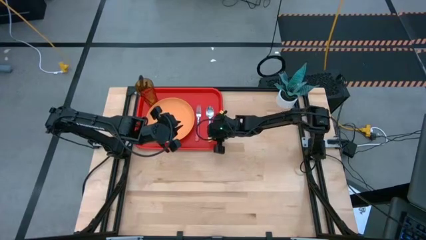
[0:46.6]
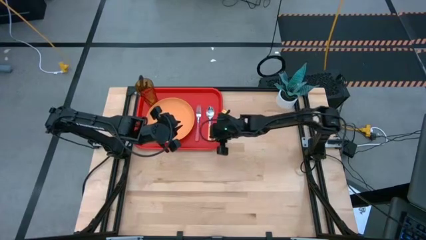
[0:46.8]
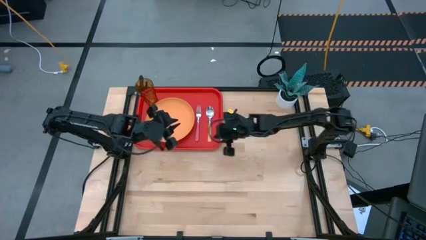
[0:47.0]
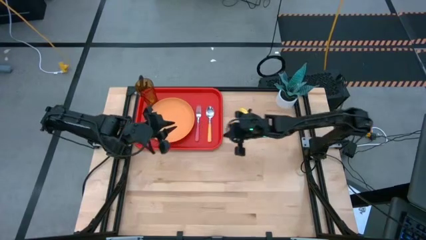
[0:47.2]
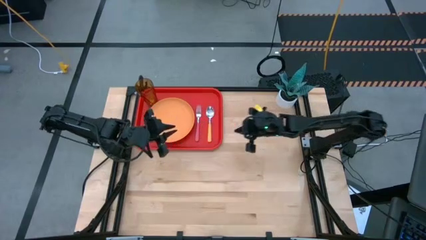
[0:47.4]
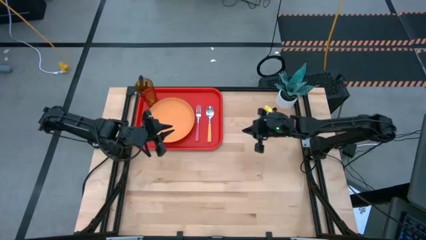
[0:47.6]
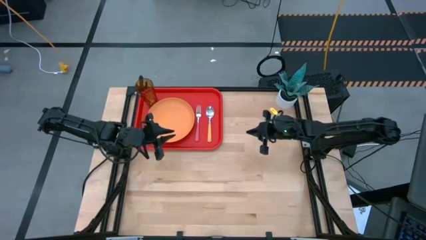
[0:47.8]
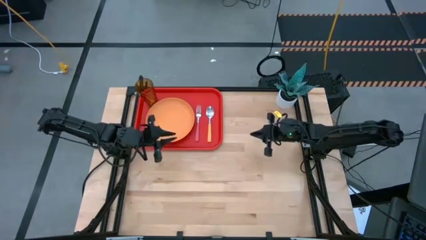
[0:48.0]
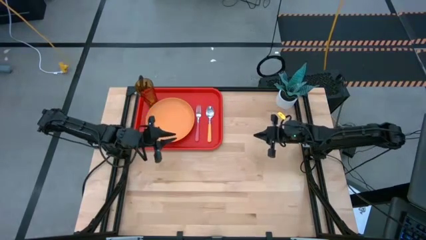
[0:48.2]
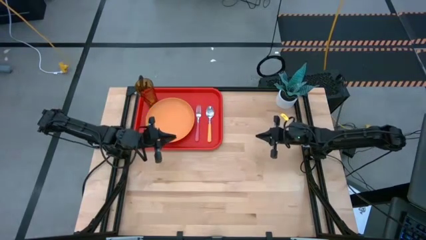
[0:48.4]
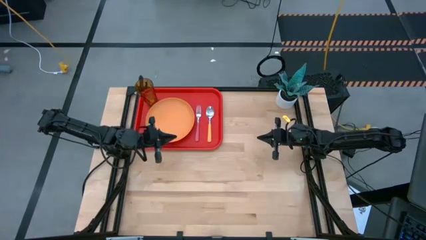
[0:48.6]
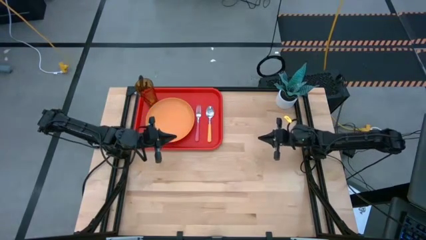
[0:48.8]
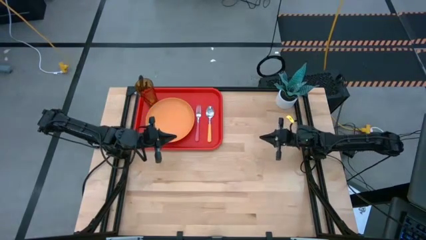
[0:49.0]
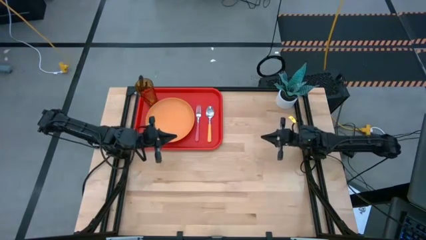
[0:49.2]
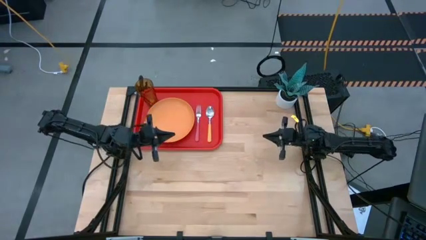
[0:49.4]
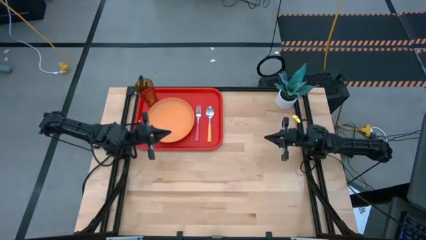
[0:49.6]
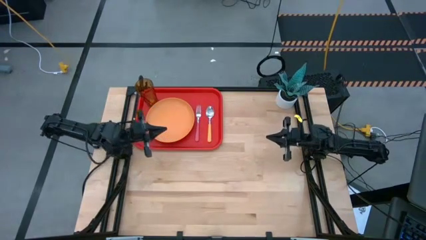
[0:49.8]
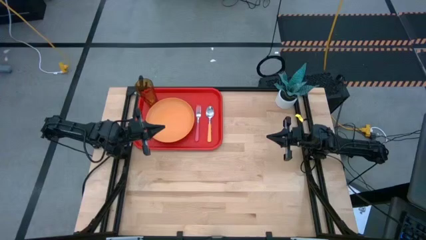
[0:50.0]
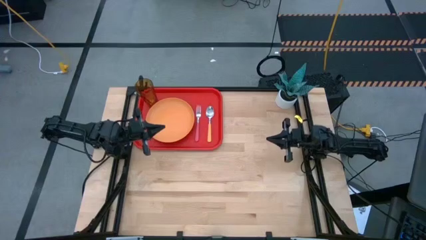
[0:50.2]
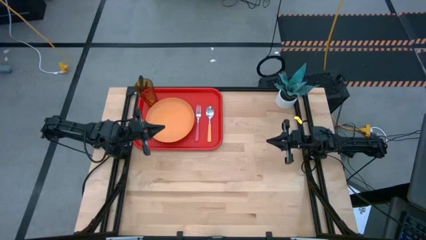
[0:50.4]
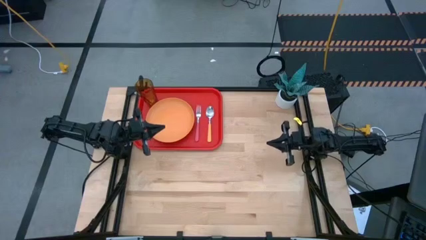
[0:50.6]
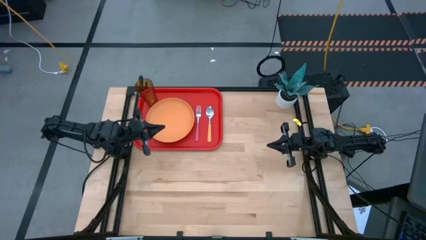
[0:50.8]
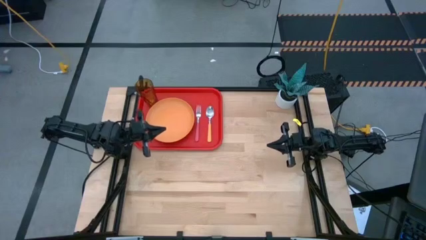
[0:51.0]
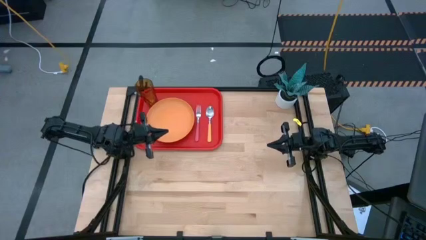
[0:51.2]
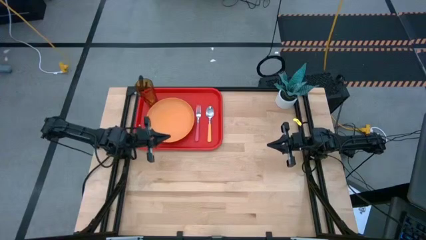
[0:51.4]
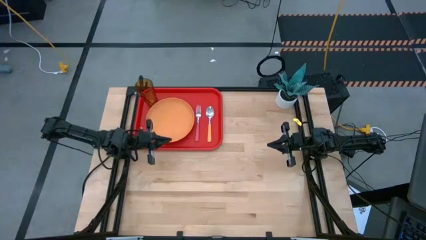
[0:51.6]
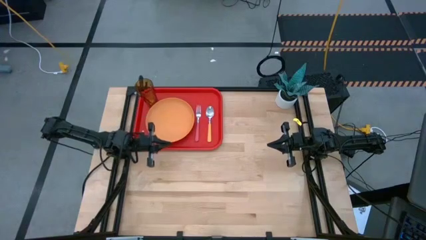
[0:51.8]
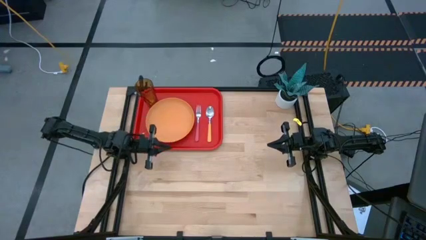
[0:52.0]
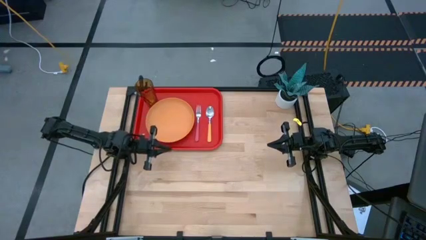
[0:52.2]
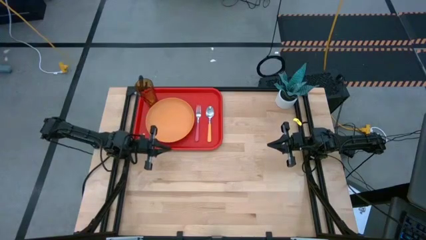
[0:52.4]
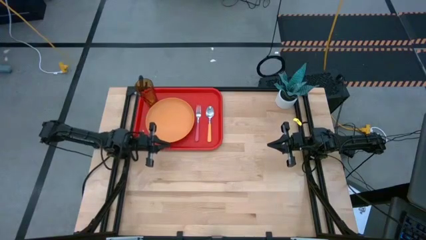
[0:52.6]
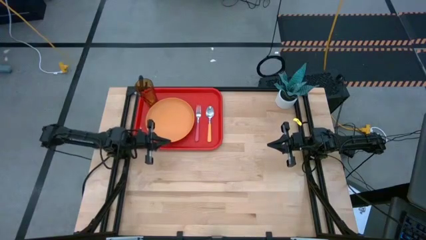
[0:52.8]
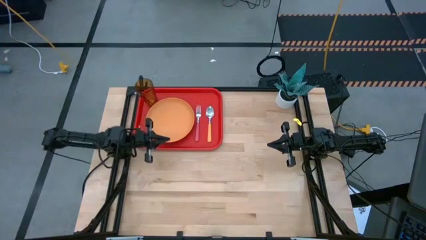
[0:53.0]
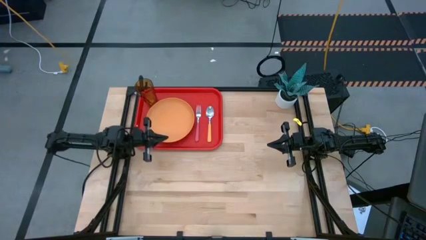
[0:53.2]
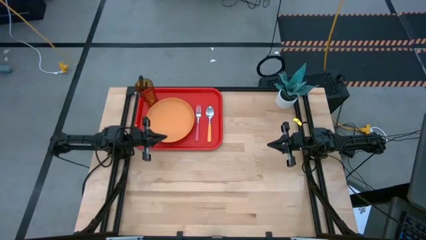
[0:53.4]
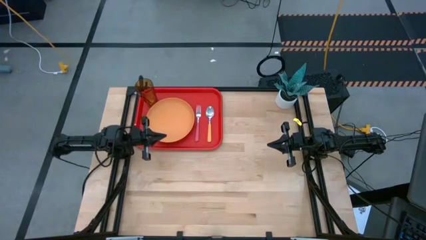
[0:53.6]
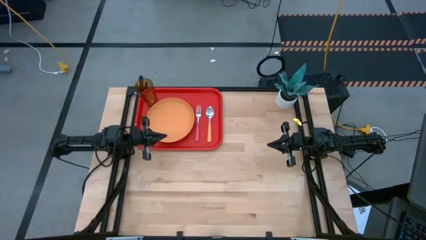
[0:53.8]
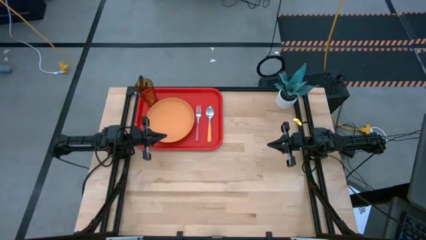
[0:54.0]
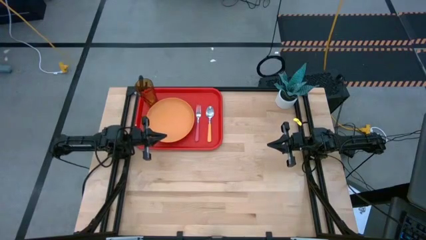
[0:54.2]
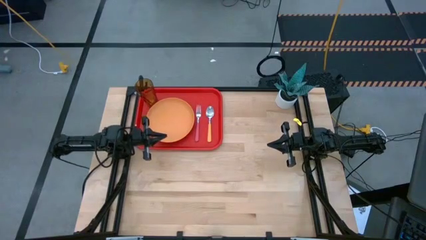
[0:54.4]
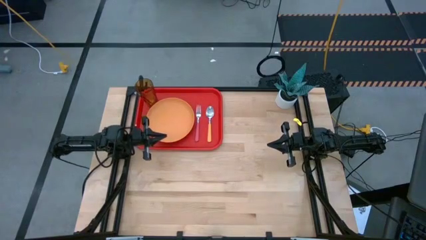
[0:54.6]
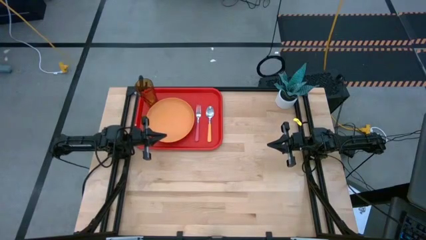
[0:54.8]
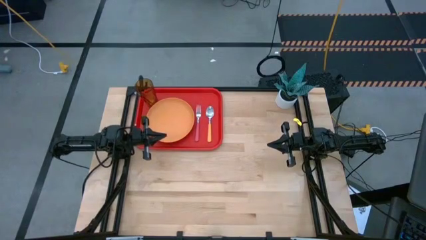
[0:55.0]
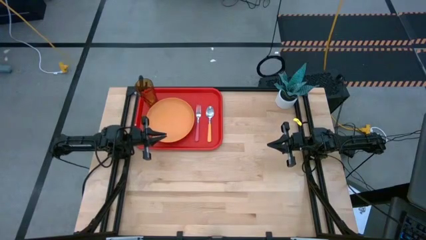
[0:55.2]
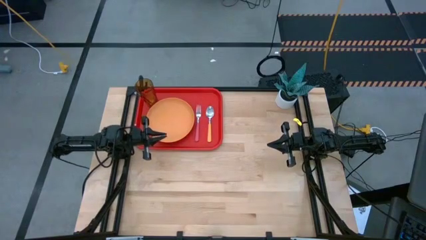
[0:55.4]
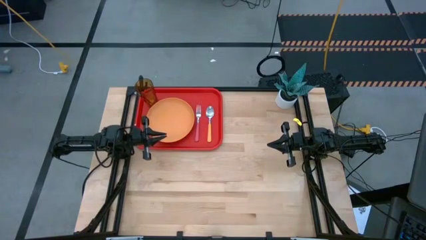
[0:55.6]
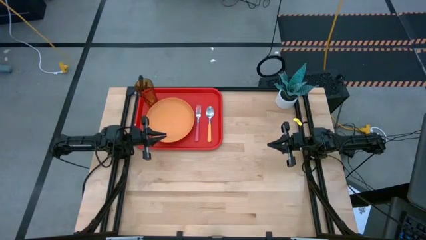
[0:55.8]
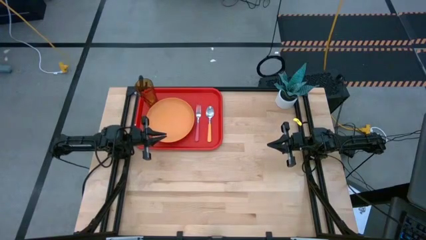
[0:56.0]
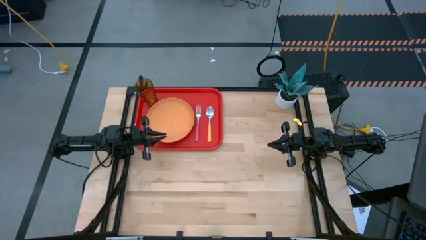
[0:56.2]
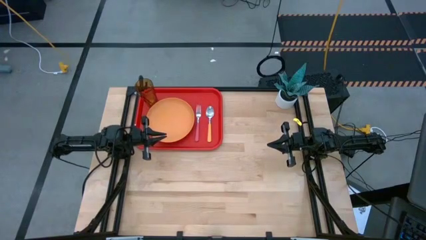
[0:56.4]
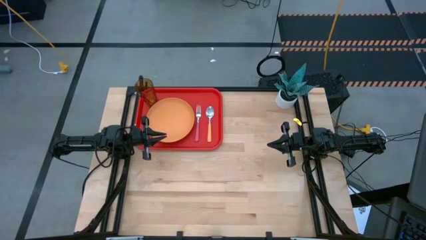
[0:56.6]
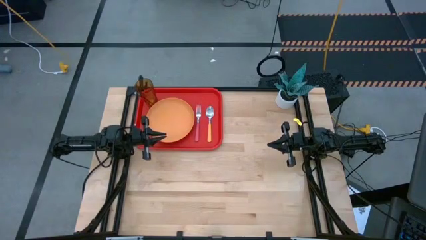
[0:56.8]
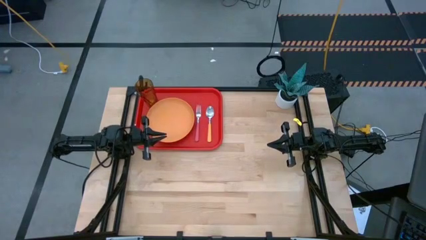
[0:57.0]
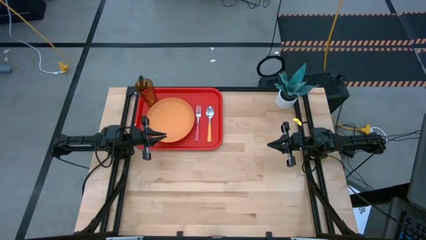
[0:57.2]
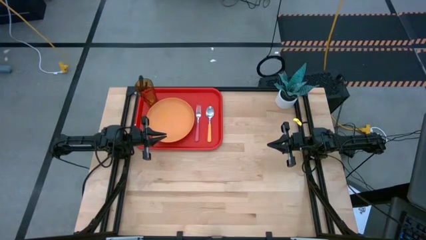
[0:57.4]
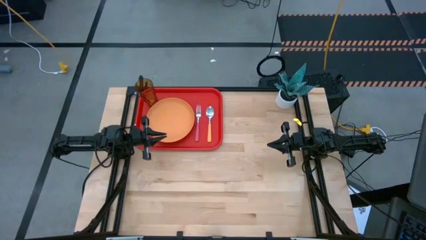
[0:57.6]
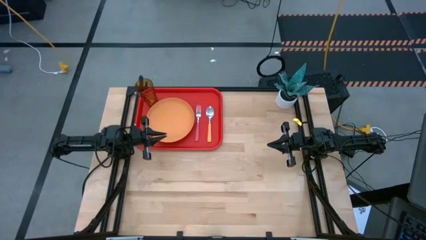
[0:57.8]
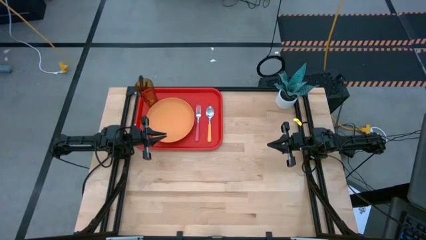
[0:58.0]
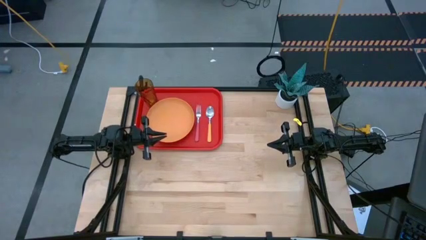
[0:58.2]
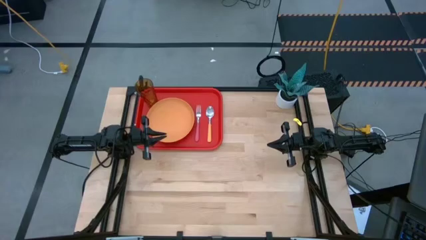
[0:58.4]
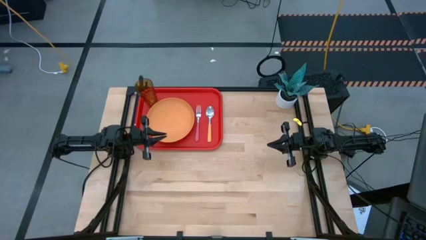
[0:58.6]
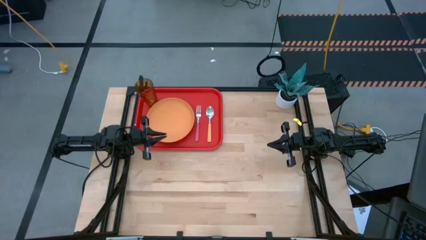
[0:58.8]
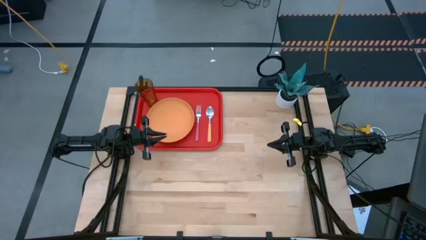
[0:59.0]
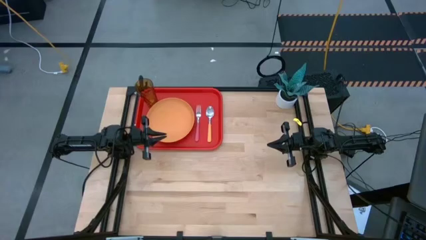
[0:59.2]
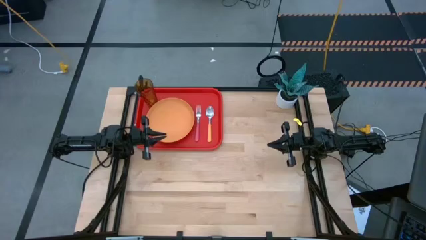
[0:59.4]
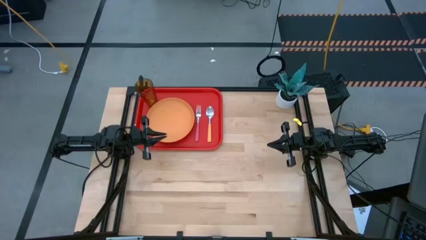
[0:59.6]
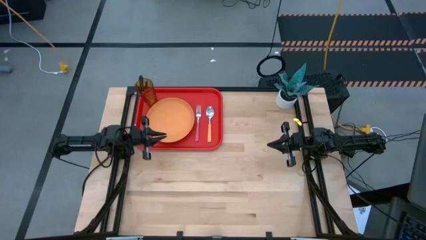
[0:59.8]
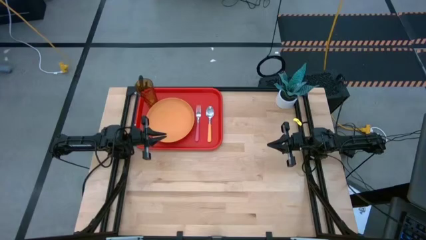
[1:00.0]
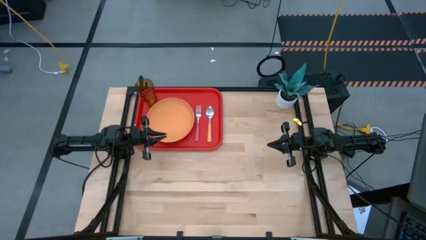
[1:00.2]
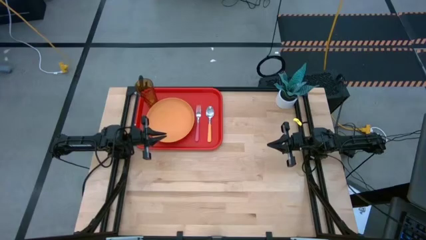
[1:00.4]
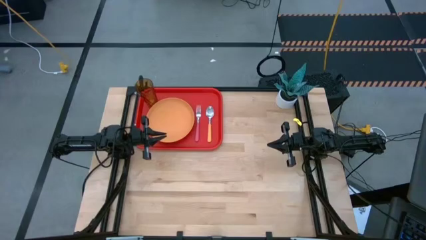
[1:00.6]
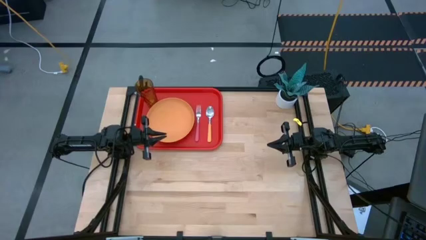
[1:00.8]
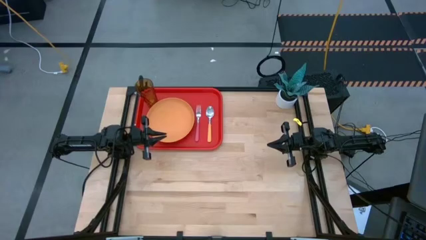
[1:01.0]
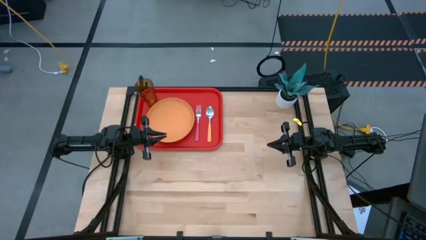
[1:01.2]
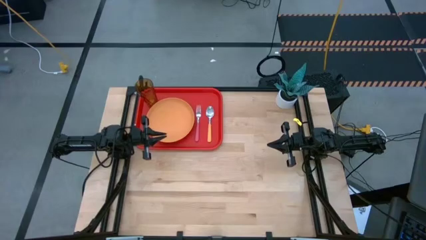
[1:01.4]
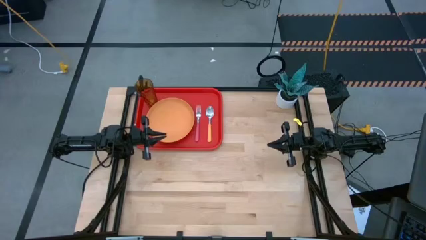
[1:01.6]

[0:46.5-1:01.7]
Task: Pick and place plate/cup/fork/spoon on tray
Return to Home Position
